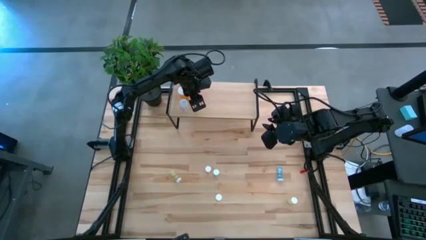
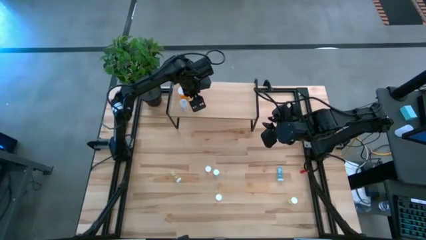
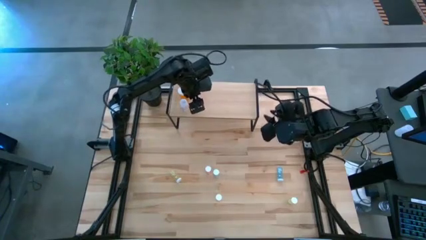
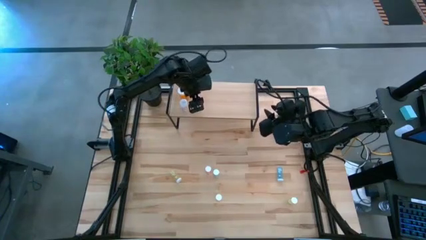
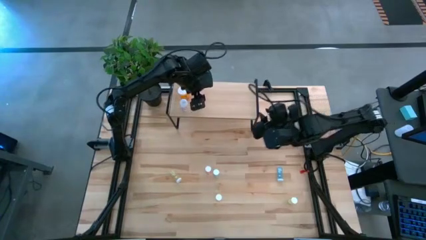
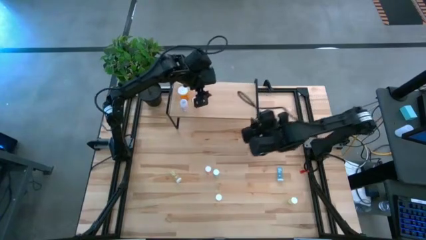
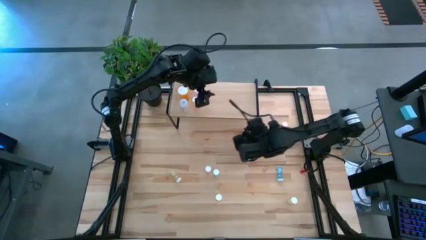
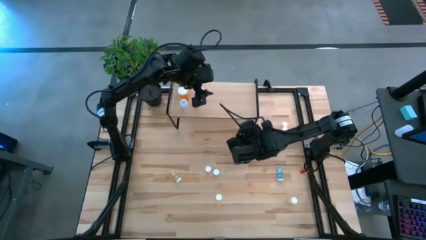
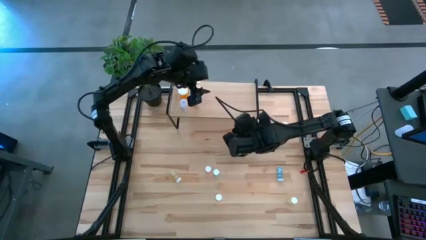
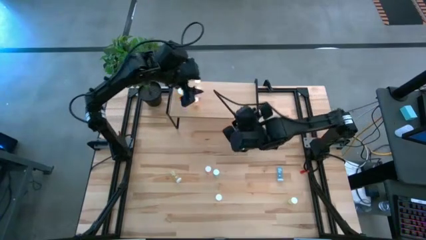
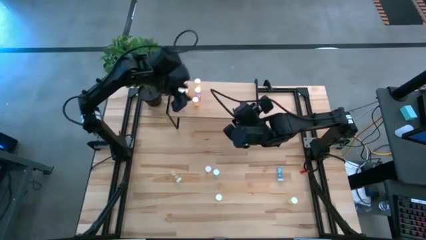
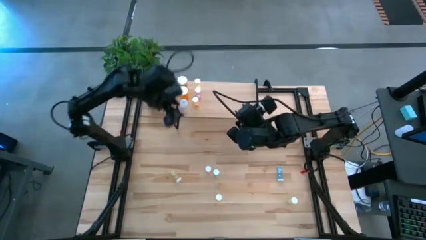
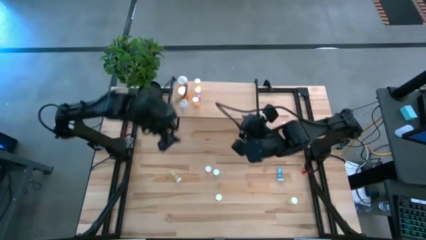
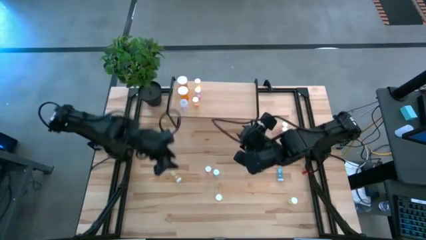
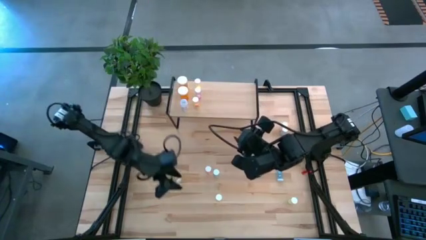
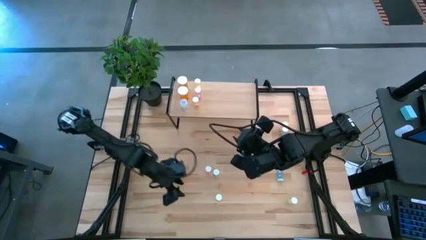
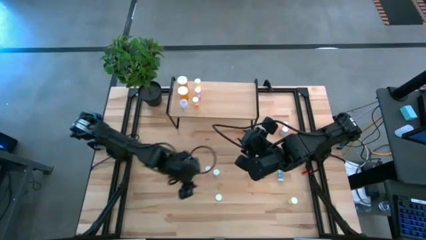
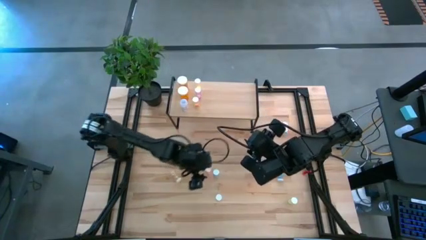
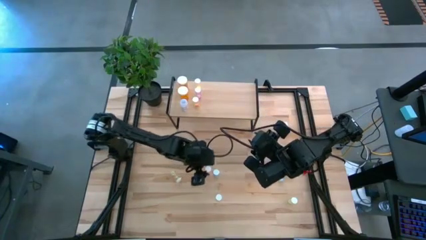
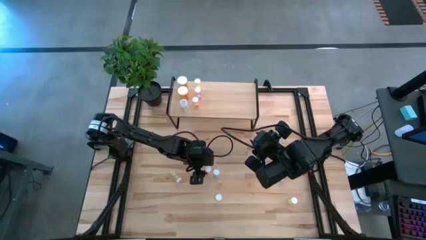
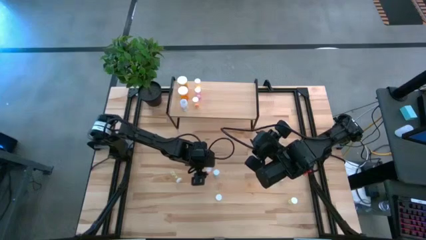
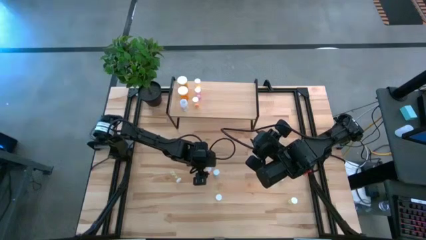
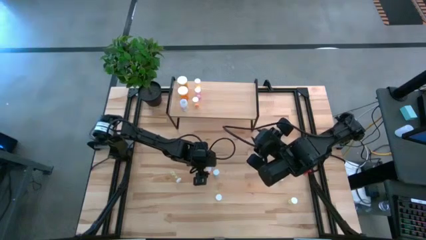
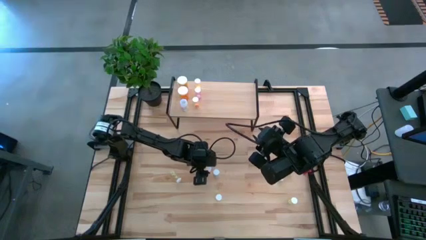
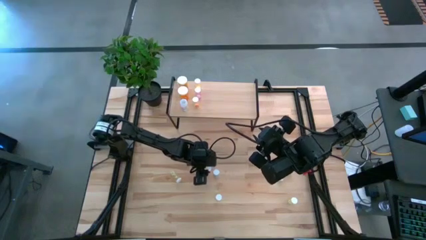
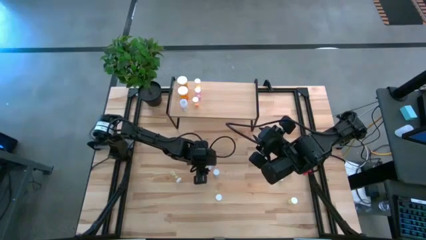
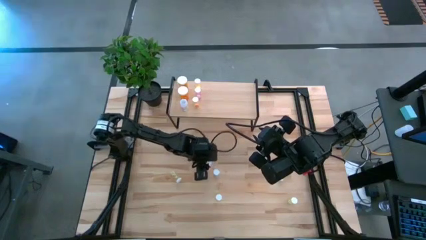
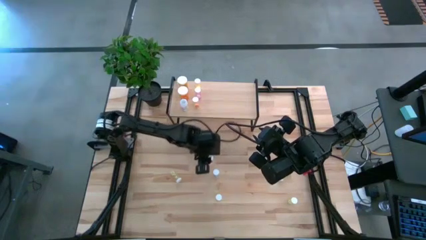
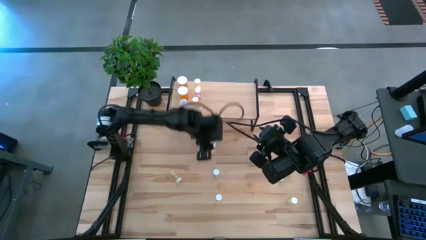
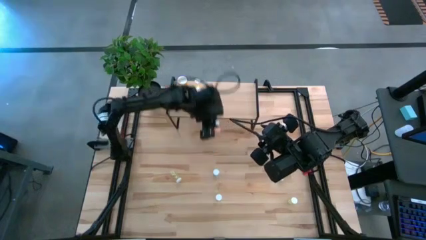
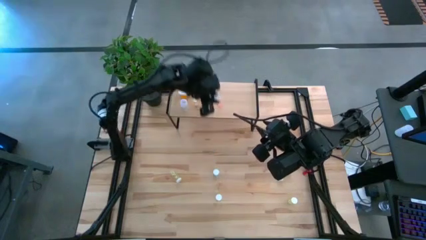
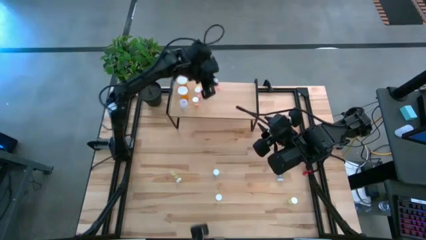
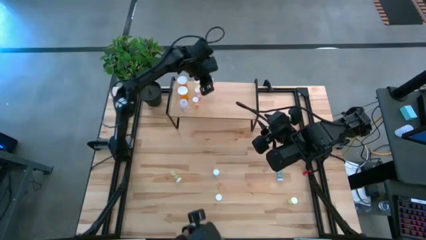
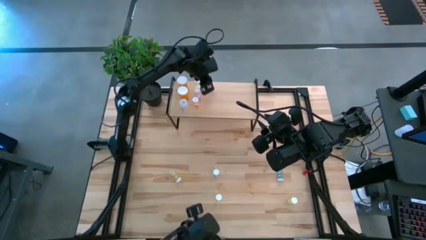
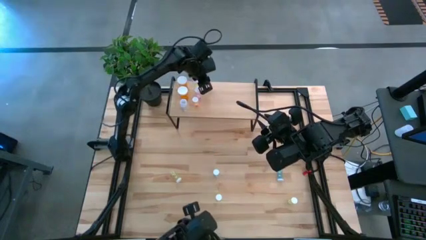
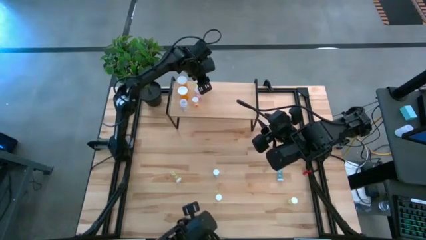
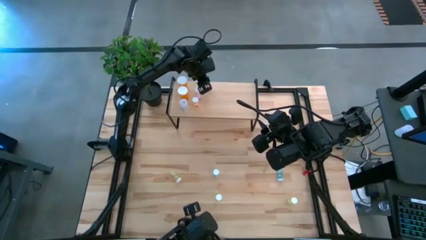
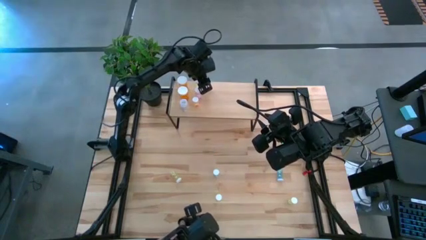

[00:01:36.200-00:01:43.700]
Task: Pick and place medicine bottles onto shelf by color
Put the red pill bottle on the shelf

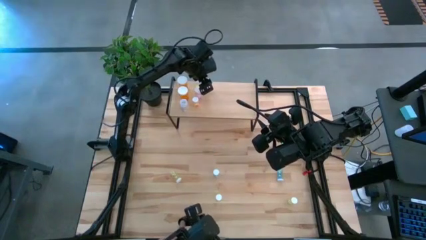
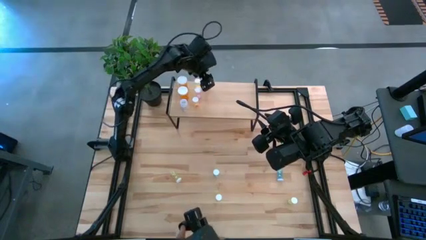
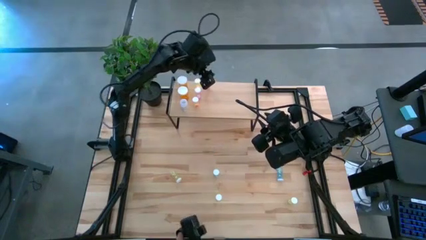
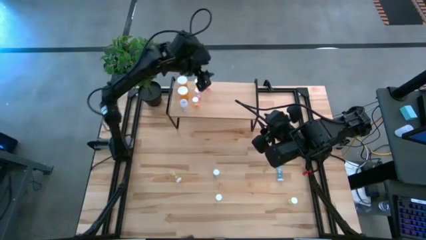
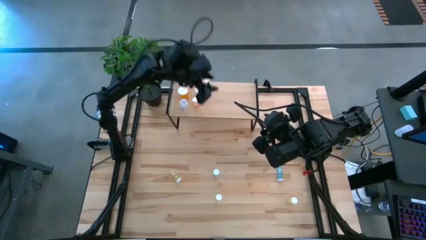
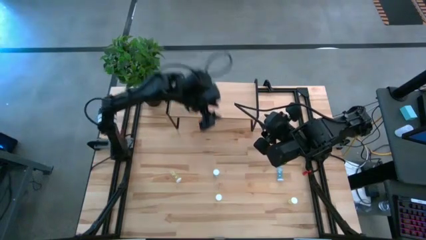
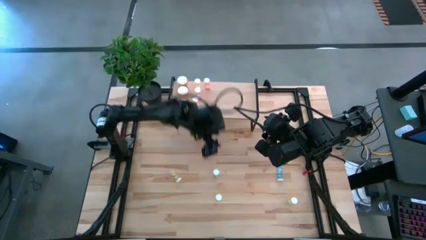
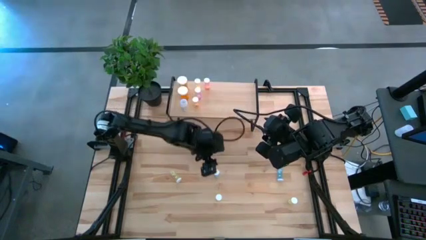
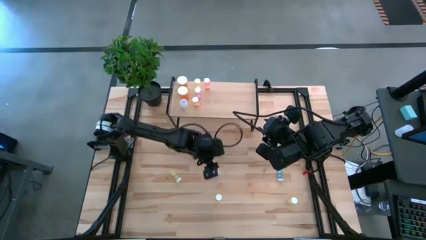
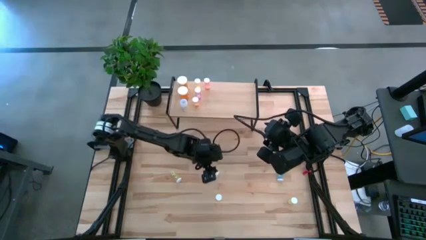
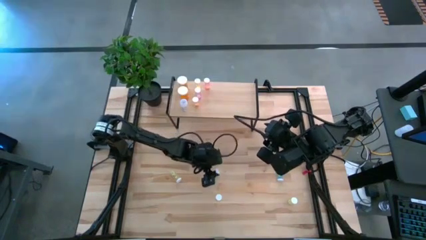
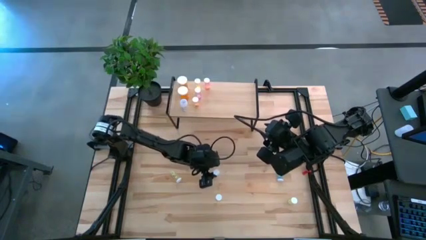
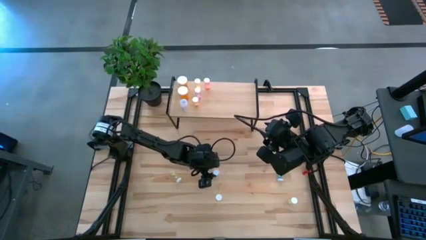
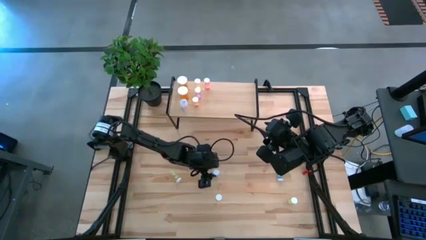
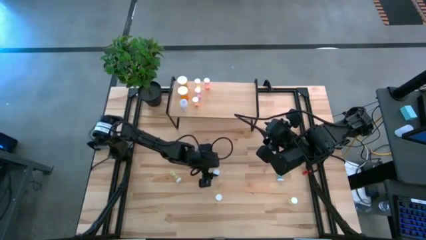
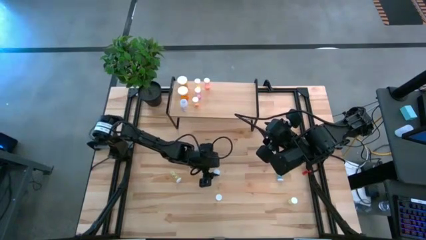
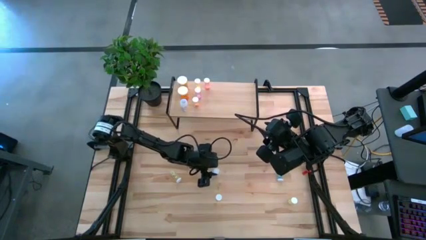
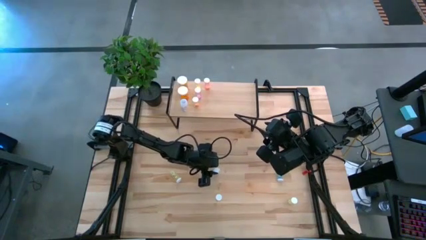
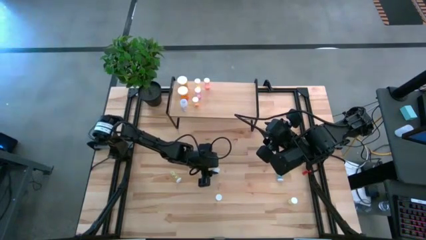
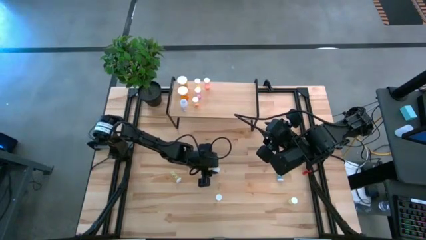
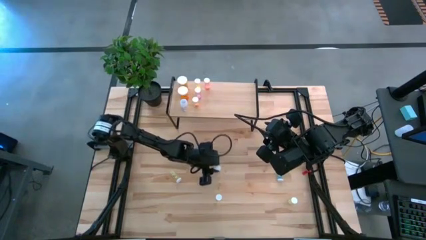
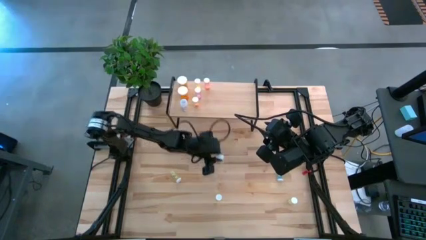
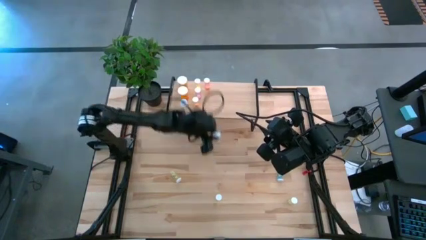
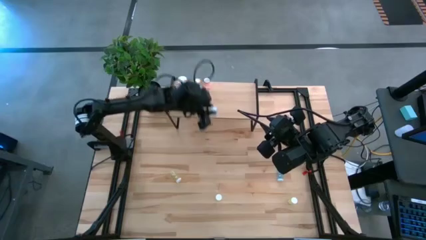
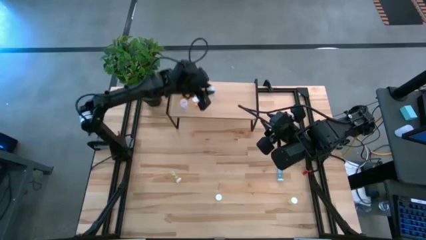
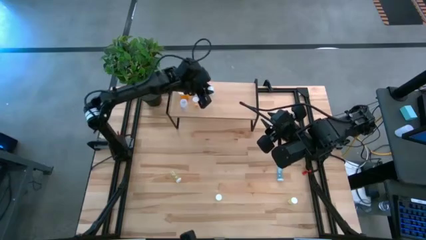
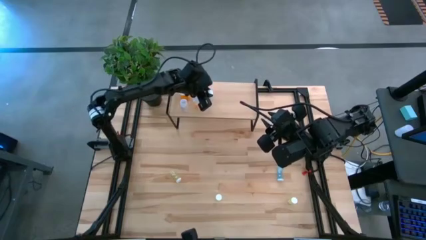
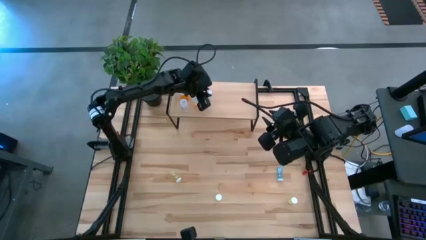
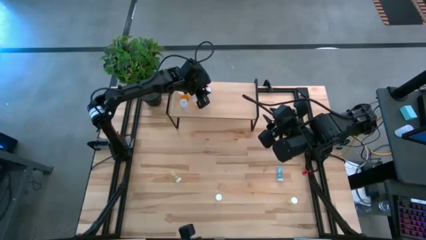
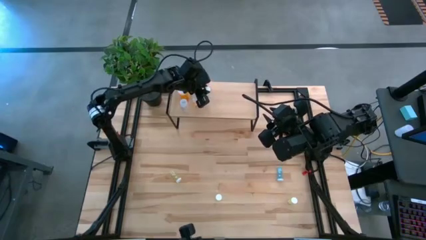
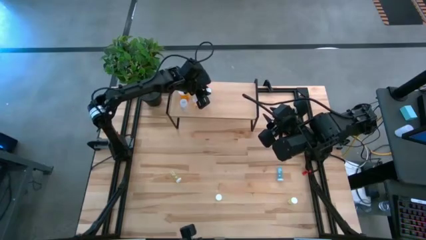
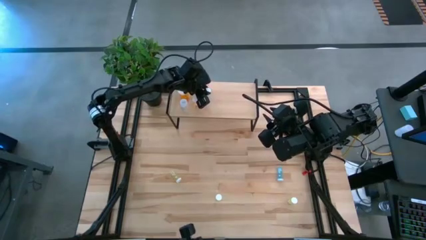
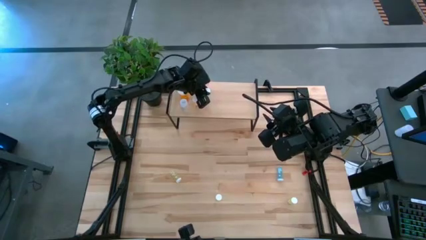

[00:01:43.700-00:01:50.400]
Put the green pill bottle on the shelf

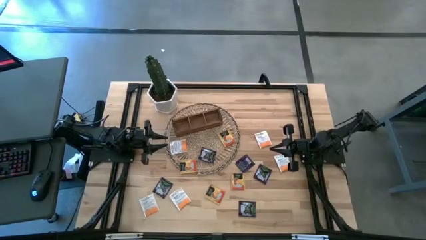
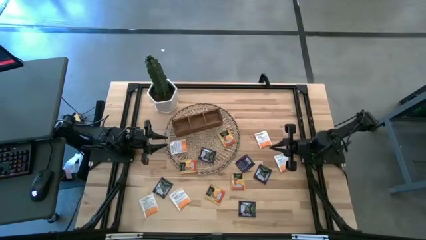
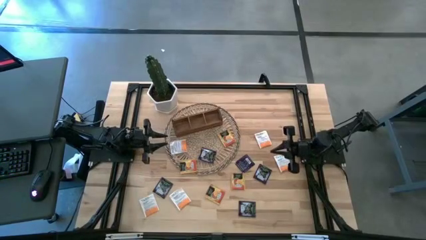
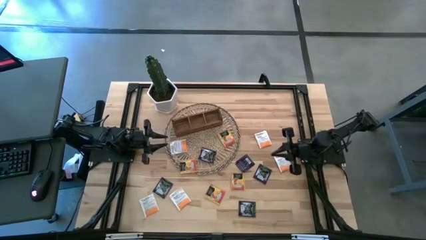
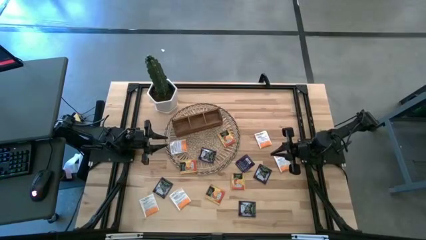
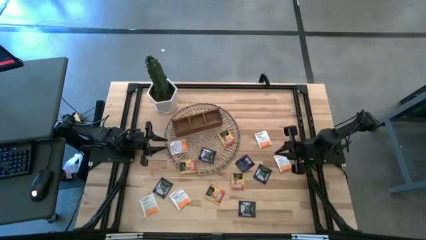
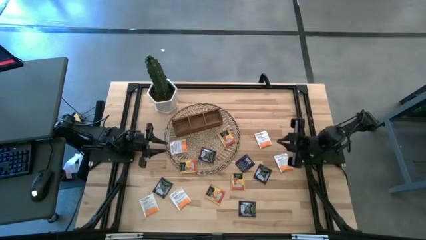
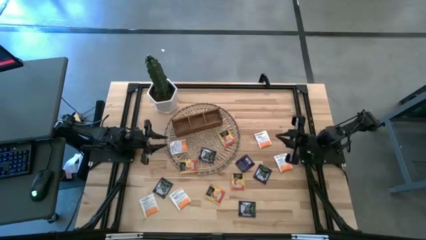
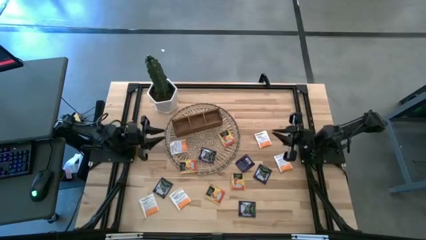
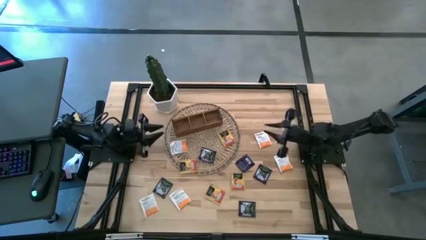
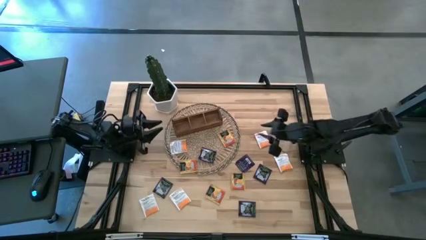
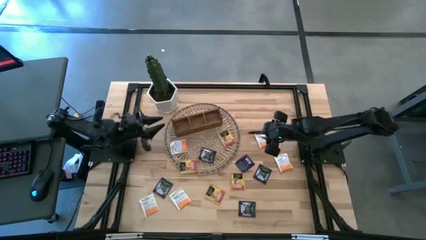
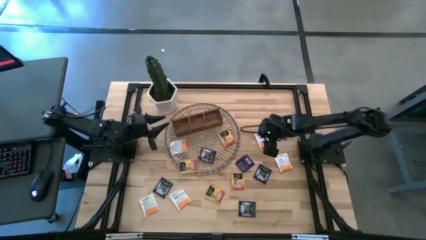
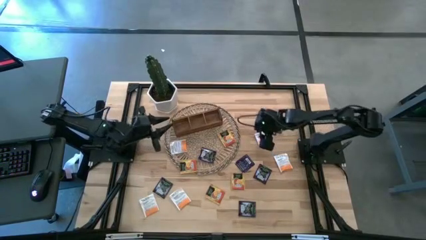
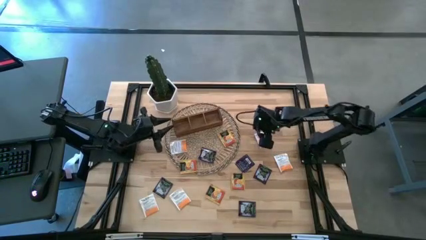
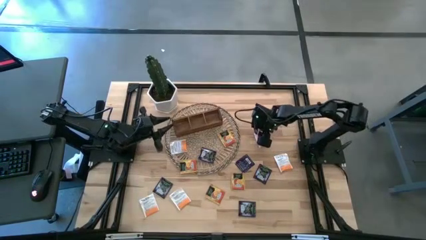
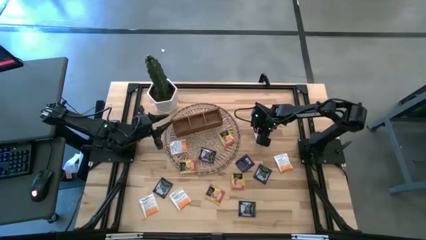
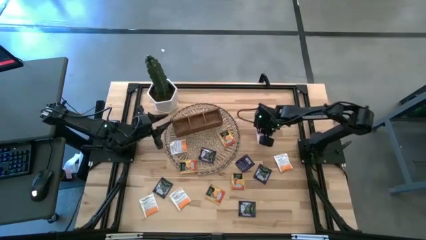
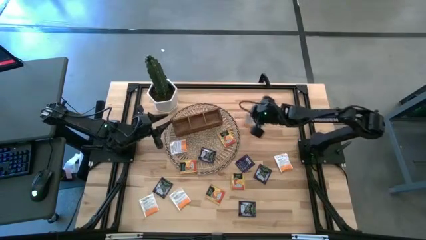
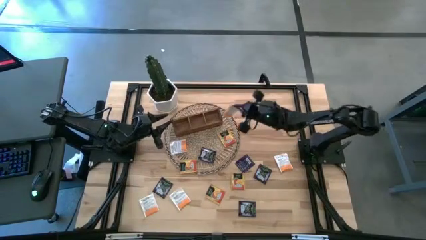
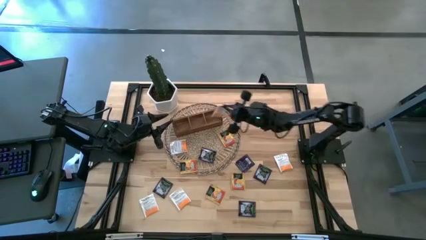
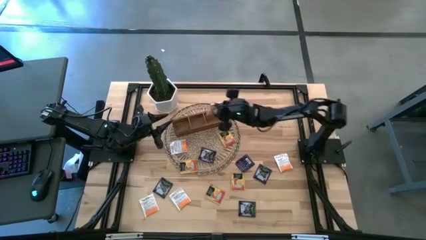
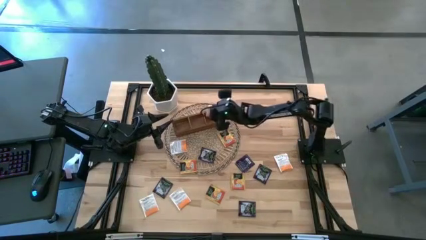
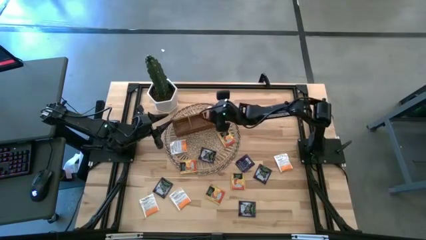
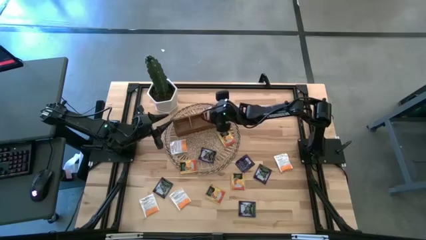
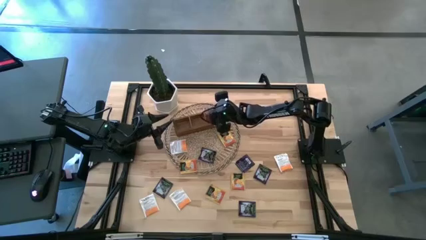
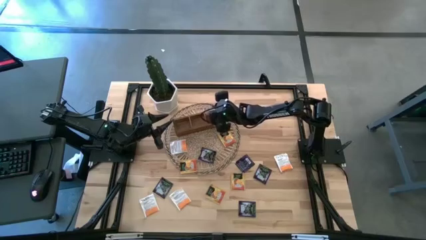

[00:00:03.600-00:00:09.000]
Task: Pick & Place Tea
Put the white tea bag into the right section of the wooden organizer
